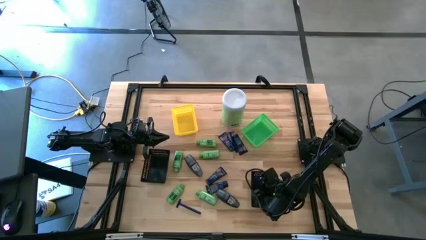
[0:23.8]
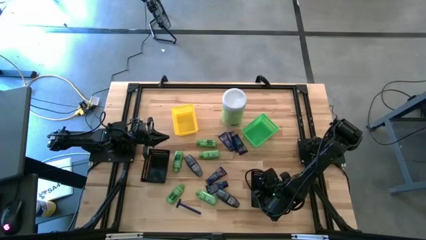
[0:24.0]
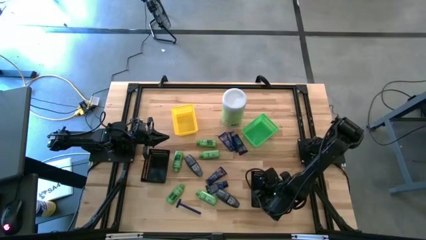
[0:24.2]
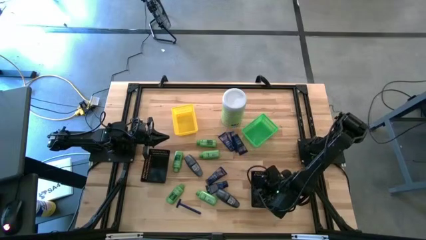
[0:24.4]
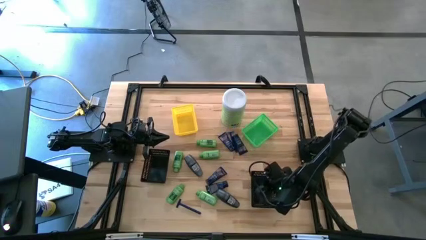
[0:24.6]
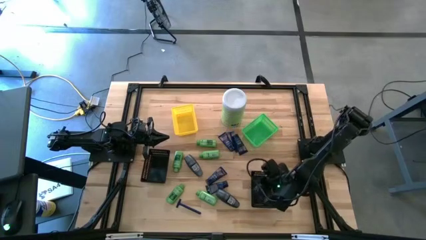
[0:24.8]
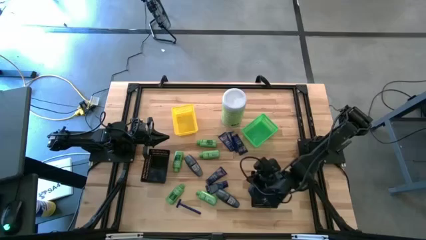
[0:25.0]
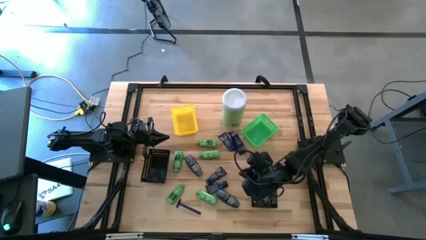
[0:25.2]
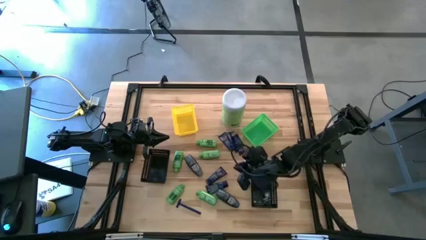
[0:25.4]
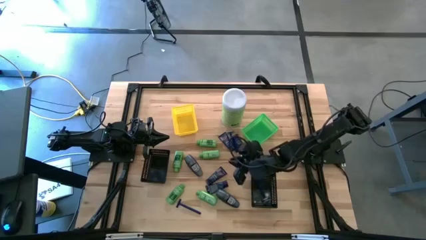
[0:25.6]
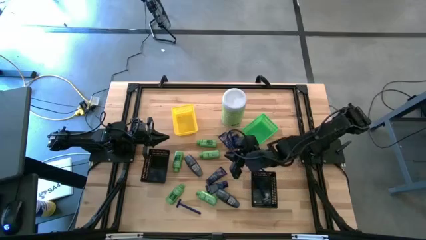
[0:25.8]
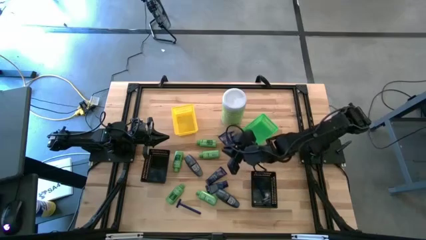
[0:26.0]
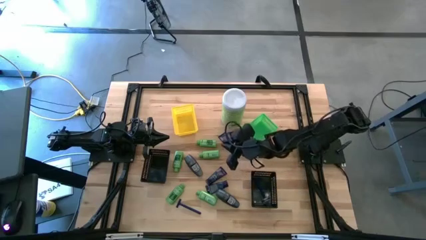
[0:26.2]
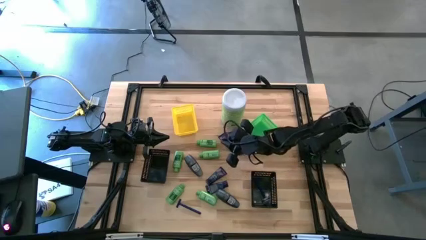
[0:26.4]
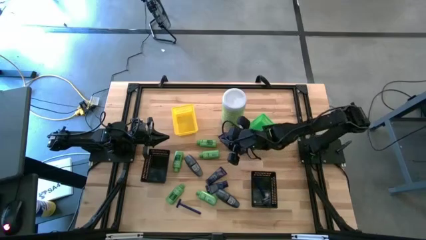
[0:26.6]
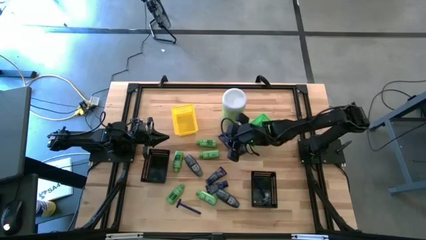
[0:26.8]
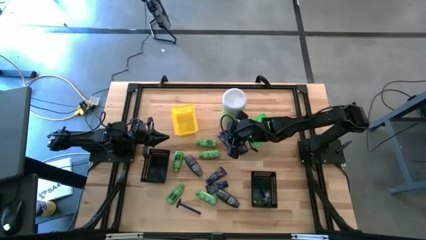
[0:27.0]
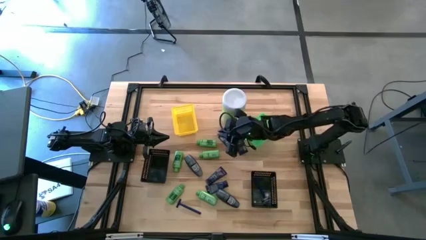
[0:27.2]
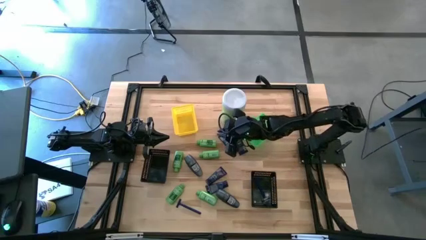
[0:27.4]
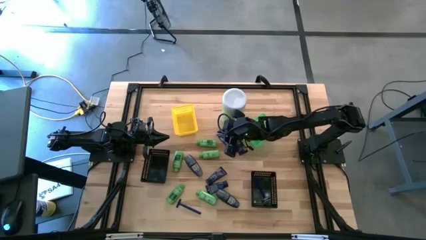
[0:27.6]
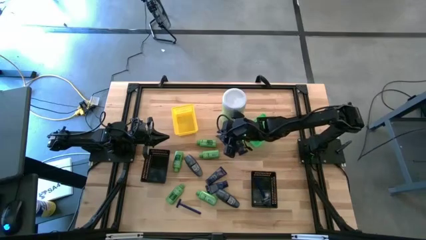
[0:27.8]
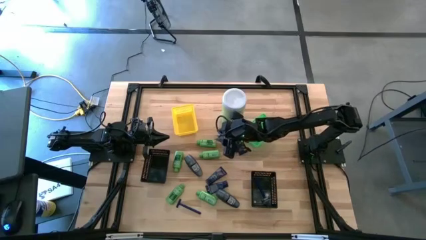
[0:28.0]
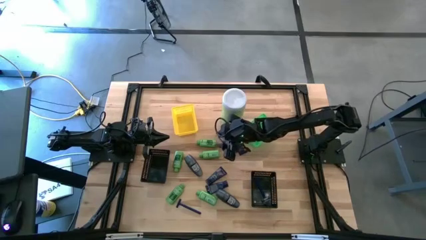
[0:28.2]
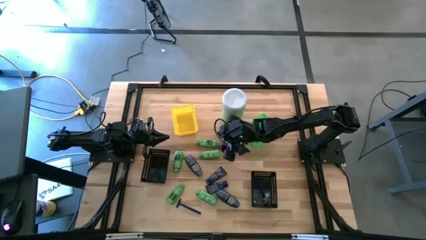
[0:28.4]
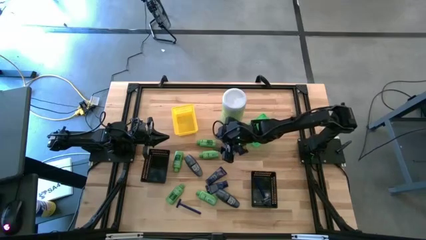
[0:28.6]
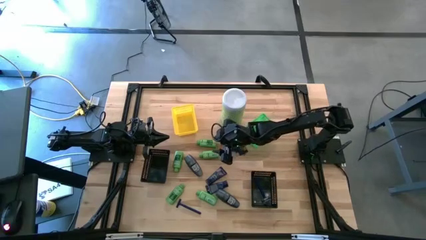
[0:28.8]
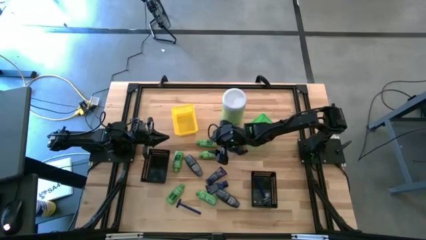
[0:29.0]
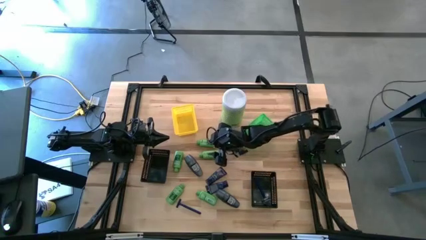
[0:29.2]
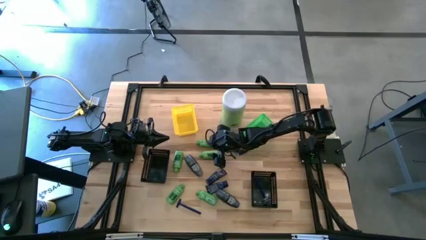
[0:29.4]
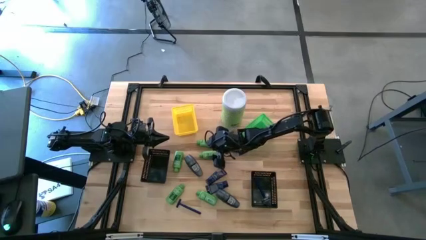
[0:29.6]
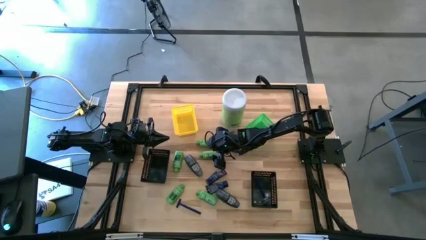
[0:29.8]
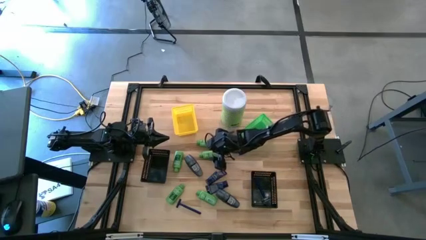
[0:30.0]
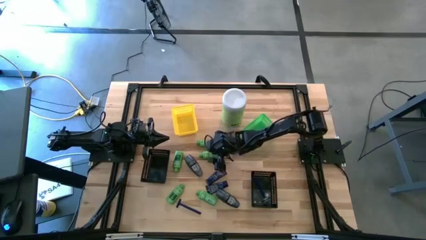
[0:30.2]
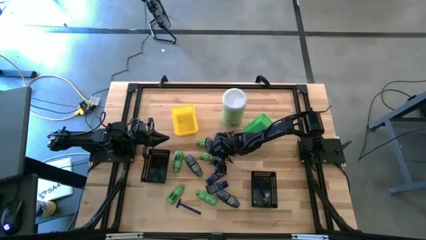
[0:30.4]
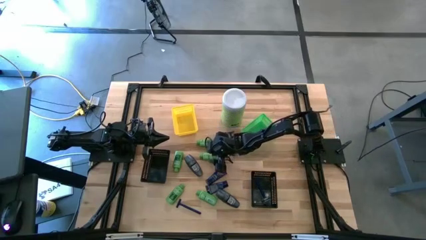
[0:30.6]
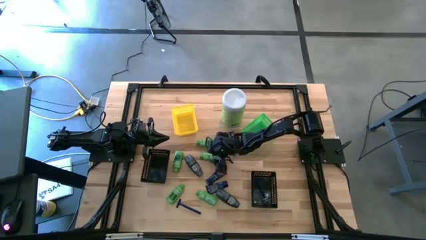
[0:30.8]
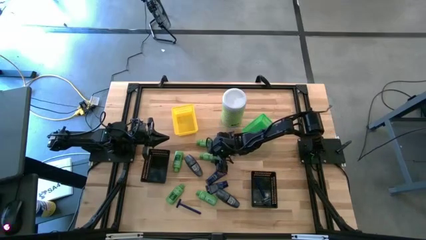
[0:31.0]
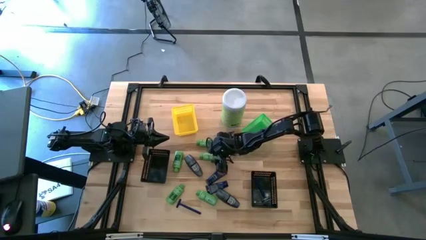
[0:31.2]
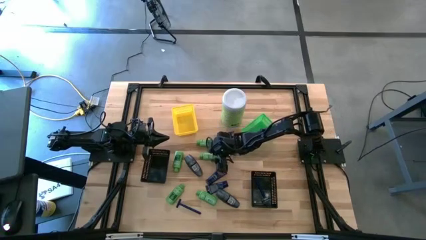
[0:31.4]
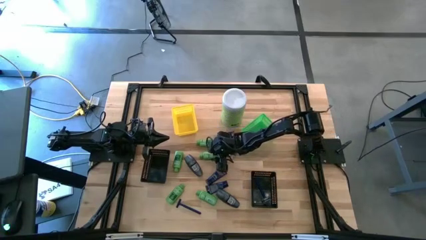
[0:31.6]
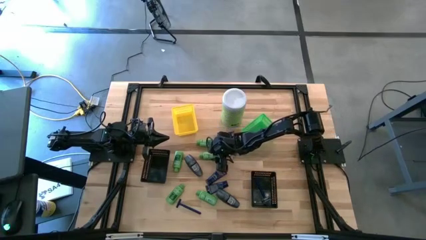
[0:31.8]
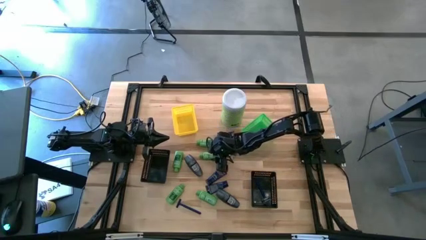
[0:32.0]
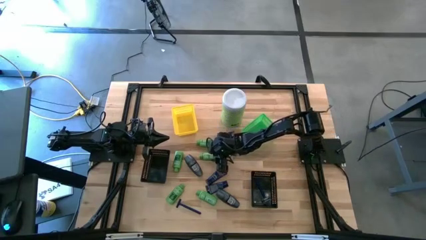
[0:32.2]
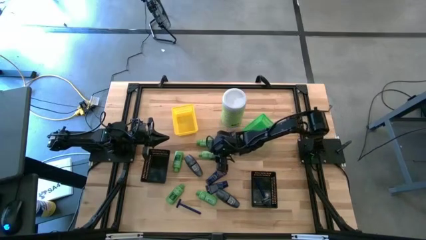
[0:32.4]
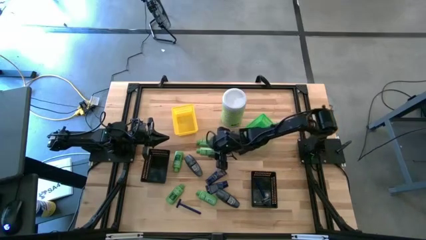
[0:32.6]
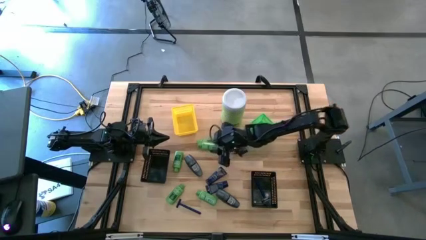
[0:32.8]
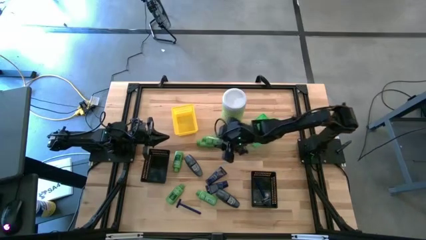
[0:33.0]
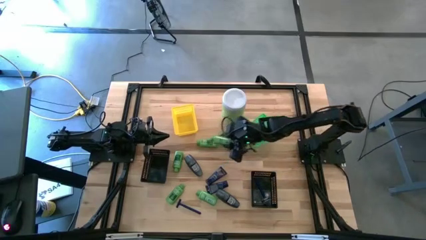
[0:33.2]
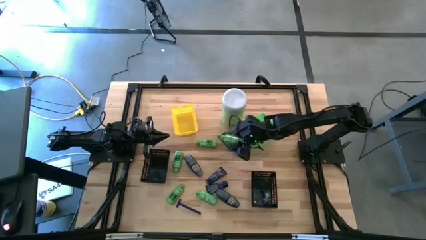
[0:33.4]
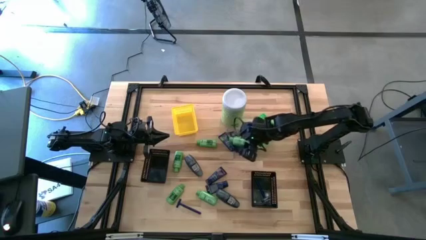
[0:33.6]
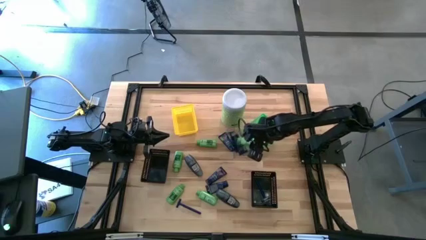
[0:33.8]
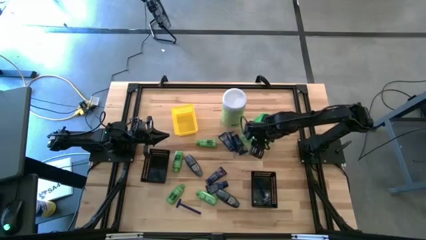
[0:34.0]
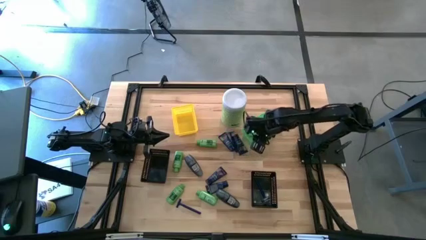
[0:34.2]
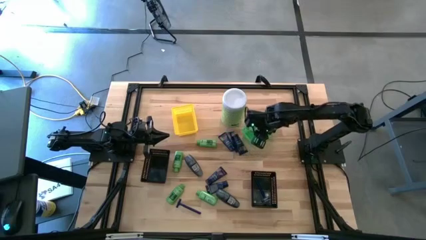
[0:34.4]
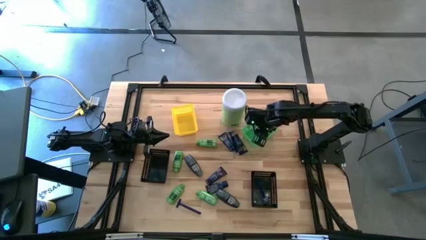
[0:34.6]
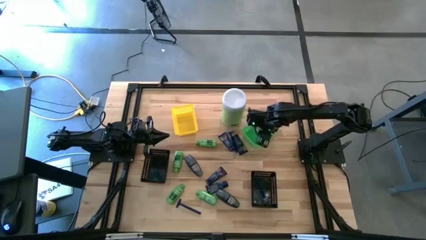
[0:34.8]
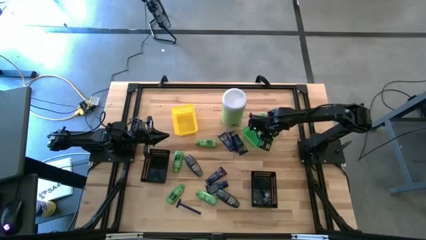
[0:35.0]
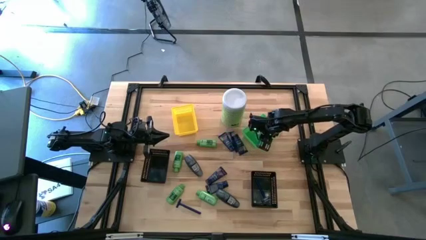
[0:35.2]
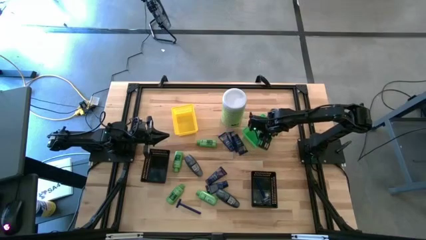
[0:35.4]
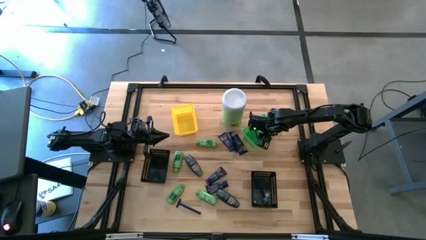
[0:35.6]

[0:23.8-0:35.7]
Task: Pick & Place Travel size toiletries
Put the shampoo bottle bottle into the green bin

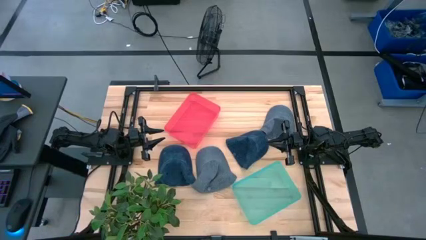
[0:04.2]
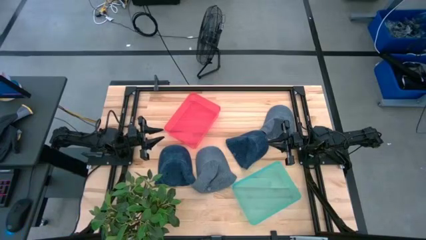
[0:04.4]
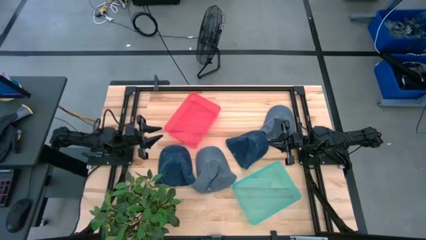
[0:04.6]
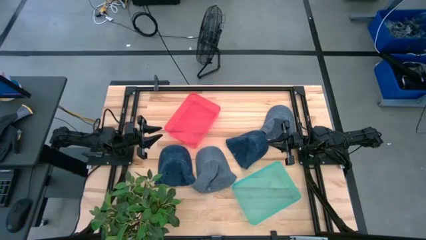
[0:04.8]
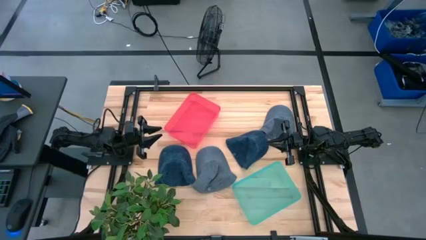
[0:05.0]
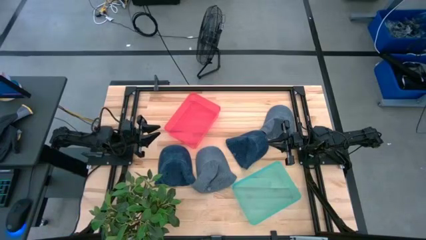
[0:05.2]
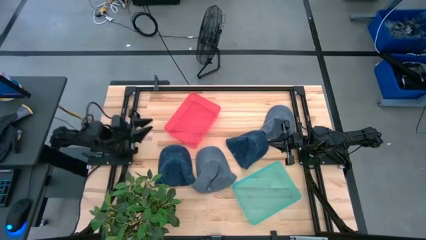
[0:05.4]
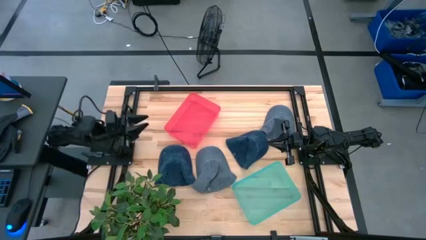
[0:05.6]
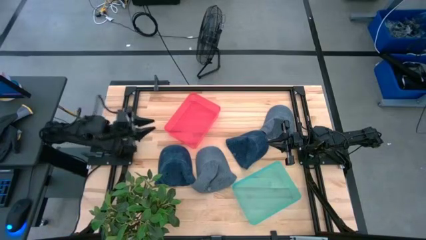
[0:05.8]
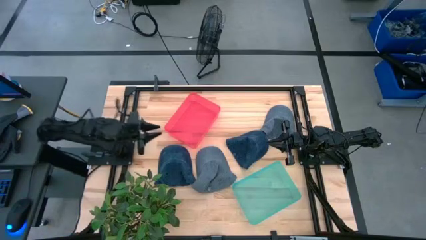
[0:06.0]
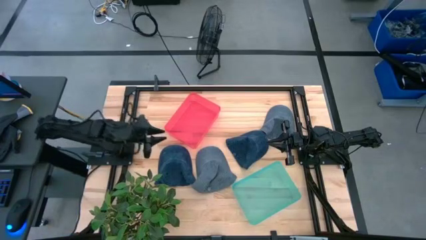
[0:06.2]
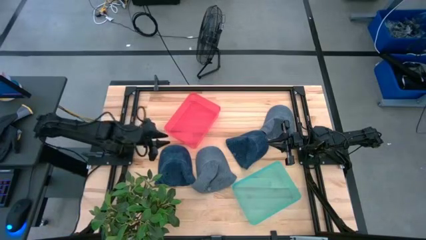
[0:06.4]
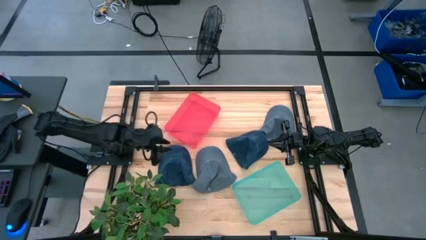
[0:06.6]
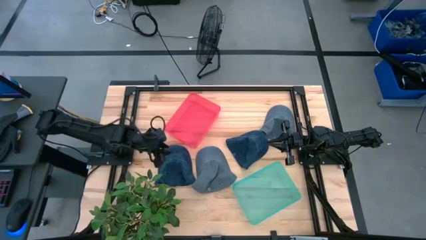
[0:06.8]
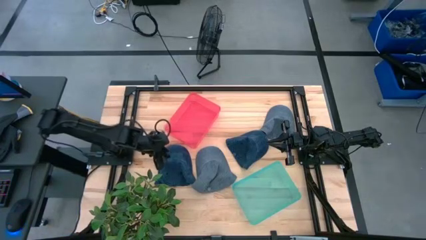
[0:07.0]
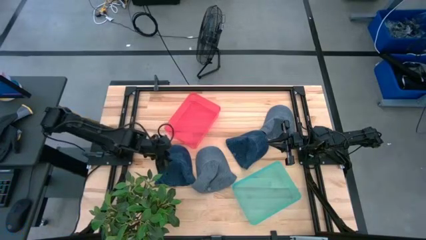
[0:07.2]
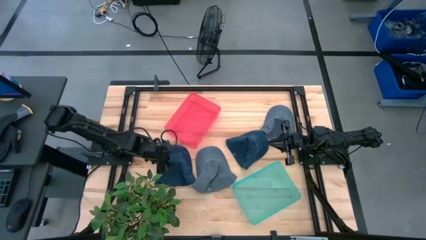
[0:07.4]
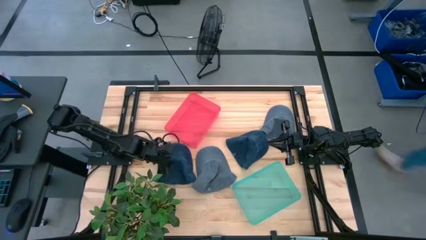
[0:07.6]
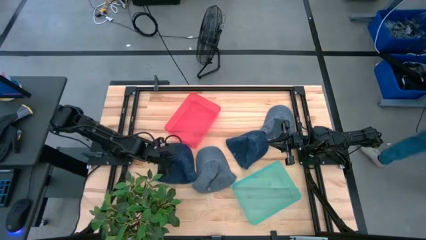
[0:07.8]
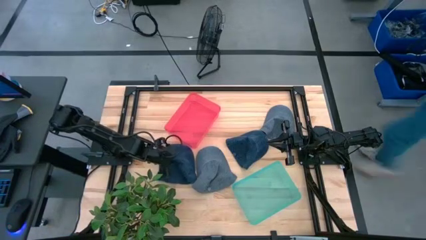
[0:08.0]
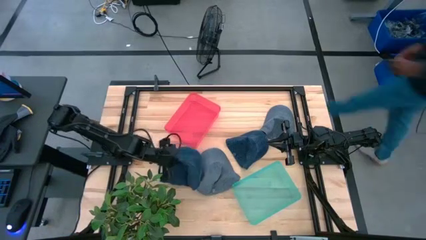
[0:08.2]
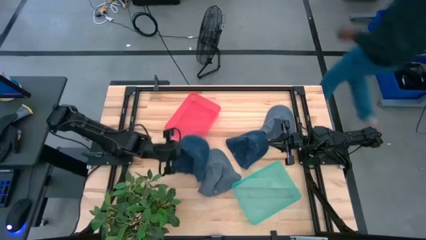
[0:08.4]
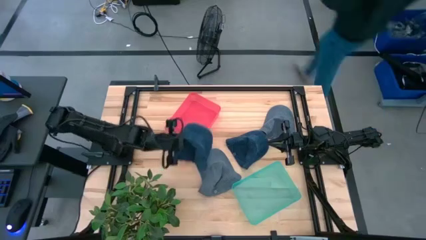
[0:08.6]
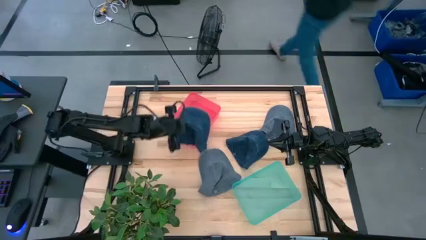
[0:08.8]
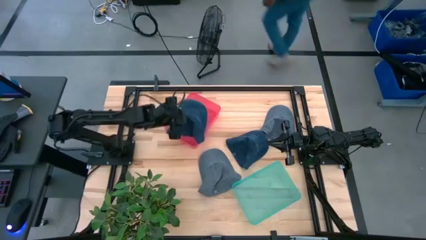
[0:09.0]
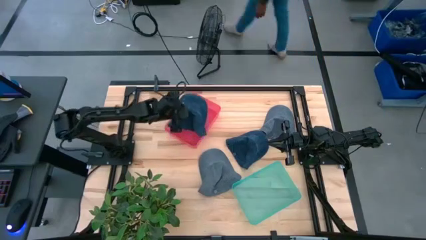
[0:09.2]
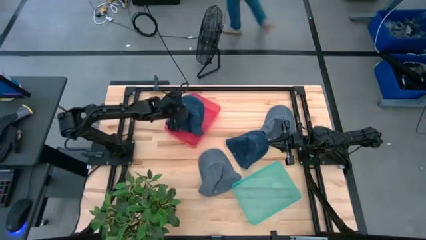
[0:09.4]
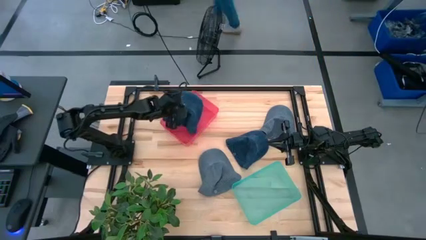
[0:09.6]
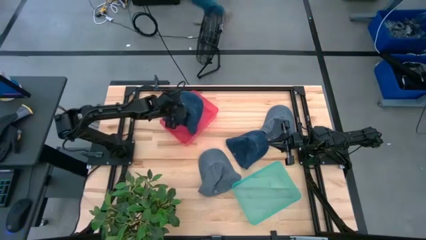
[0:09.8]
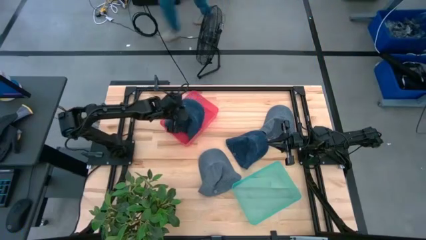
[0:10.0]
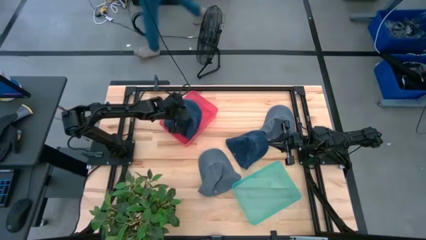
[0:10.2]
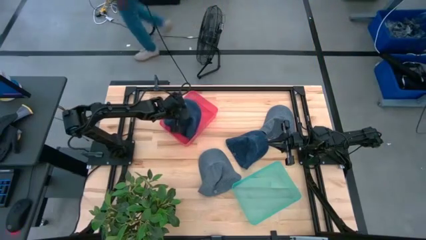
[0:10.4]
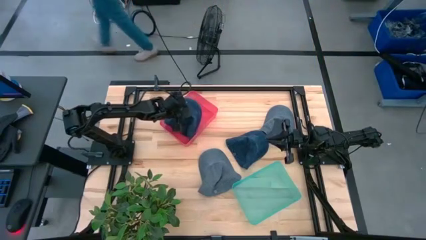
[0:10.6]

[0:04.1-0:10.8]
Task: Pick & Place hat
Put the left blue cap into the red bin
